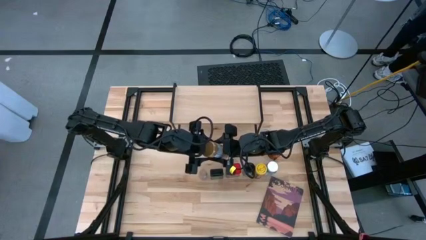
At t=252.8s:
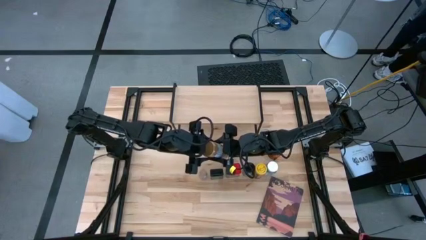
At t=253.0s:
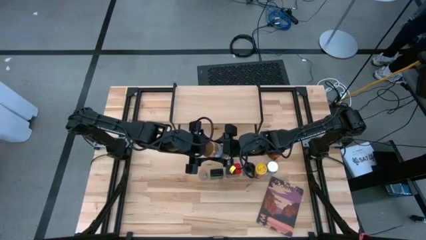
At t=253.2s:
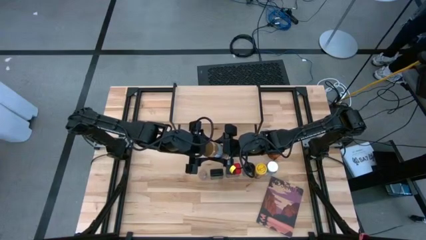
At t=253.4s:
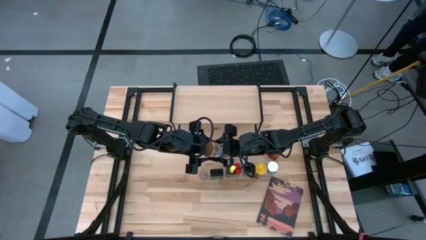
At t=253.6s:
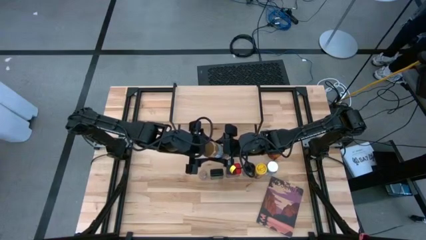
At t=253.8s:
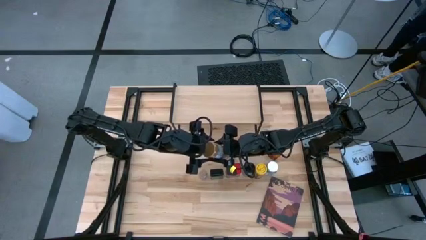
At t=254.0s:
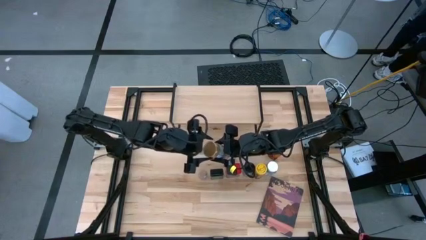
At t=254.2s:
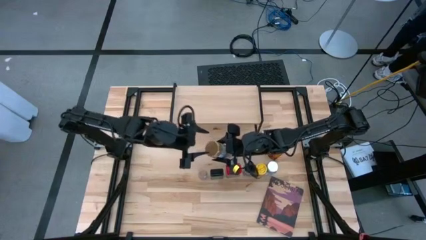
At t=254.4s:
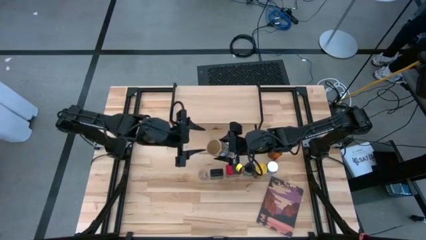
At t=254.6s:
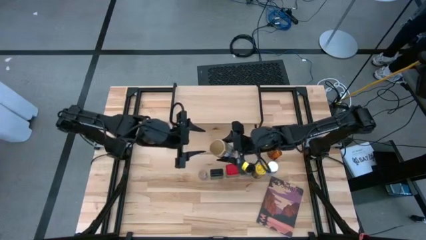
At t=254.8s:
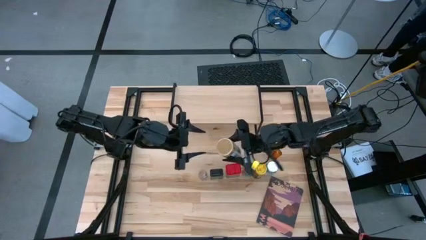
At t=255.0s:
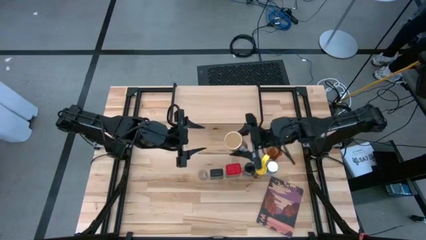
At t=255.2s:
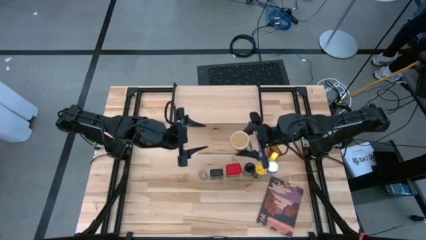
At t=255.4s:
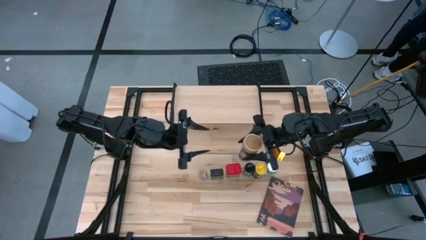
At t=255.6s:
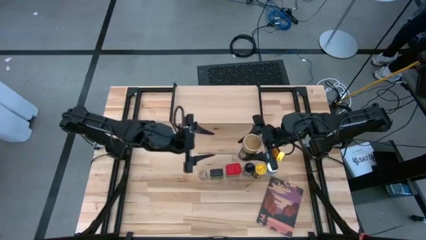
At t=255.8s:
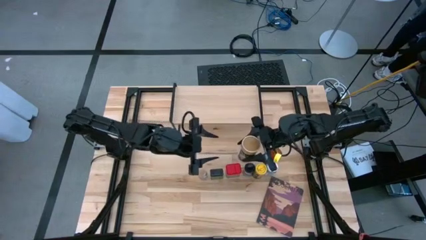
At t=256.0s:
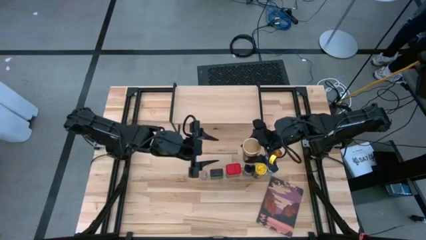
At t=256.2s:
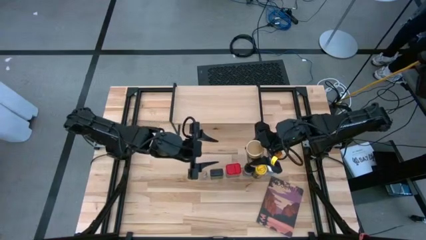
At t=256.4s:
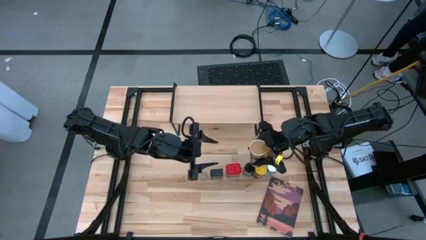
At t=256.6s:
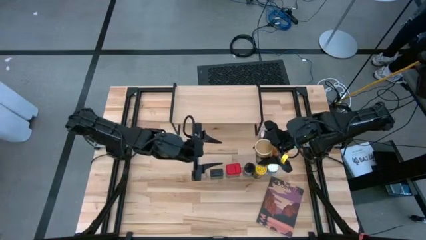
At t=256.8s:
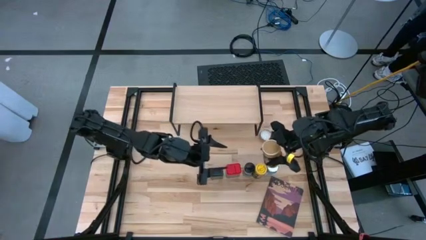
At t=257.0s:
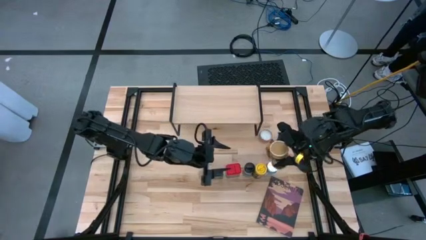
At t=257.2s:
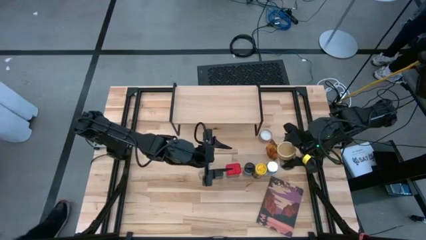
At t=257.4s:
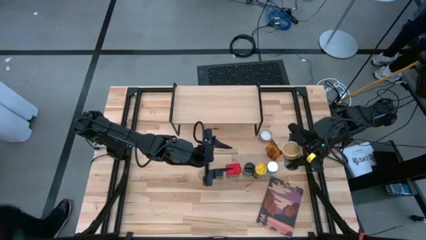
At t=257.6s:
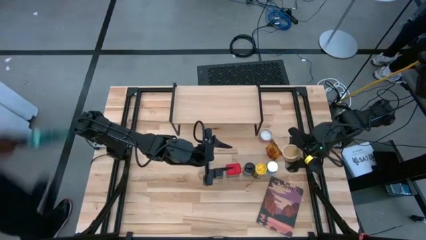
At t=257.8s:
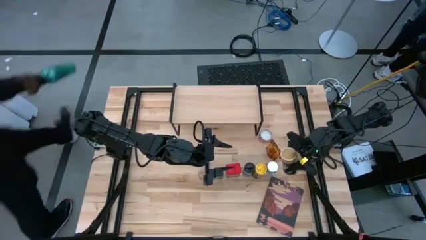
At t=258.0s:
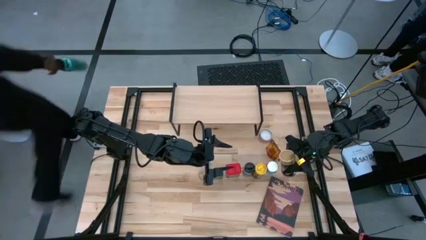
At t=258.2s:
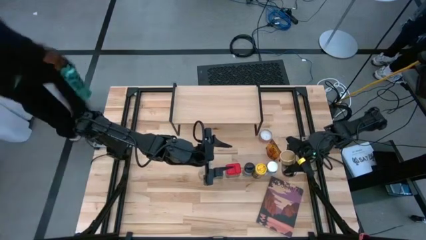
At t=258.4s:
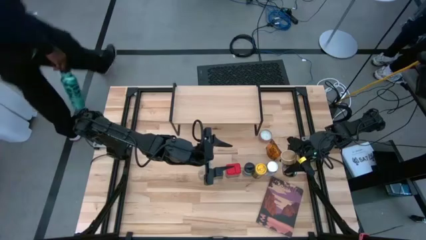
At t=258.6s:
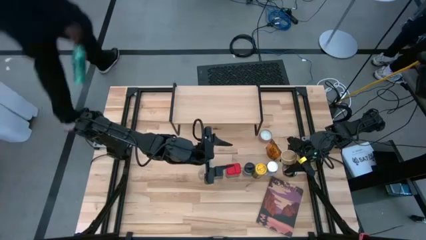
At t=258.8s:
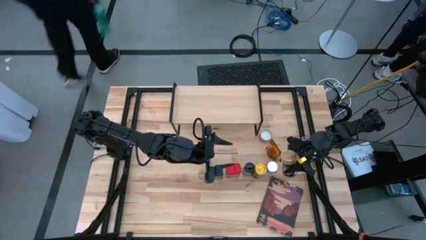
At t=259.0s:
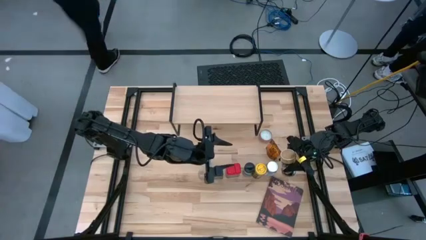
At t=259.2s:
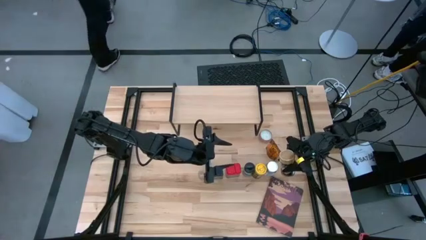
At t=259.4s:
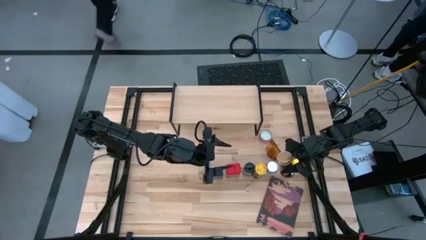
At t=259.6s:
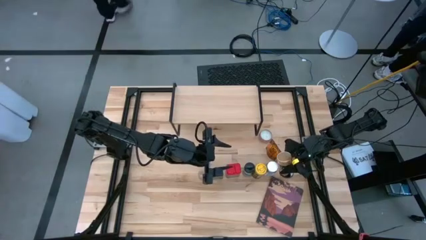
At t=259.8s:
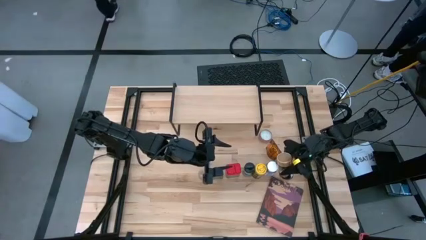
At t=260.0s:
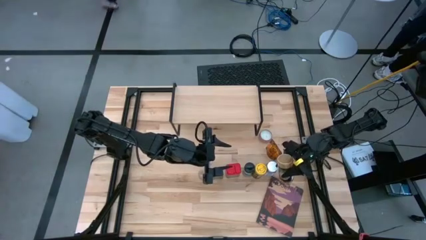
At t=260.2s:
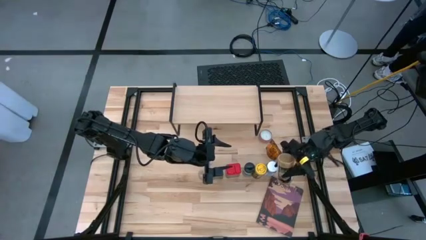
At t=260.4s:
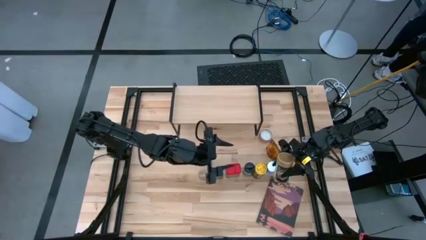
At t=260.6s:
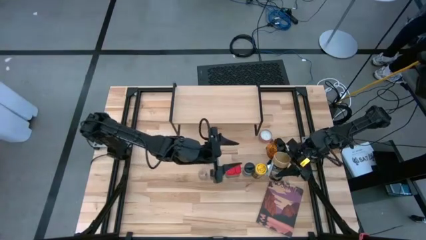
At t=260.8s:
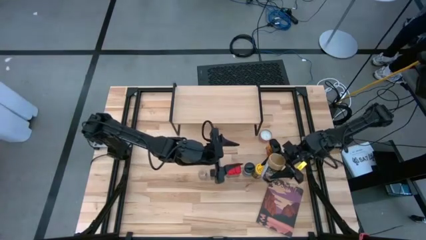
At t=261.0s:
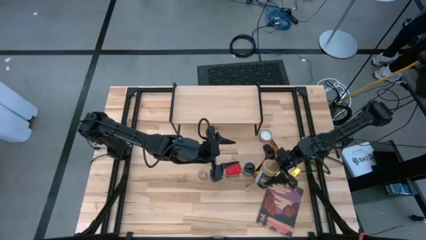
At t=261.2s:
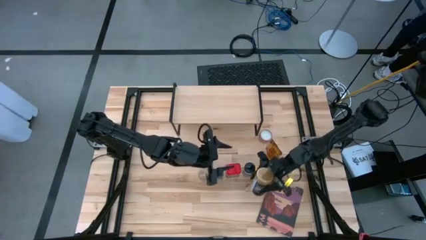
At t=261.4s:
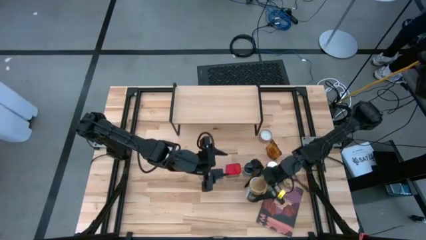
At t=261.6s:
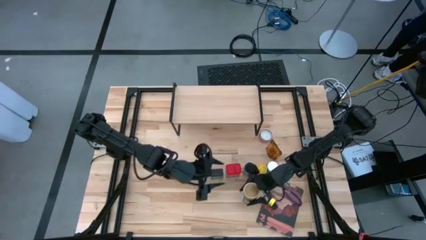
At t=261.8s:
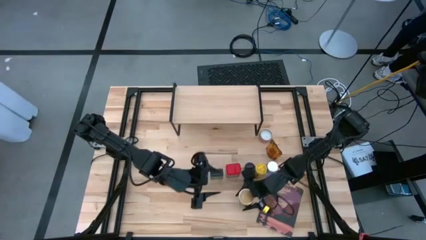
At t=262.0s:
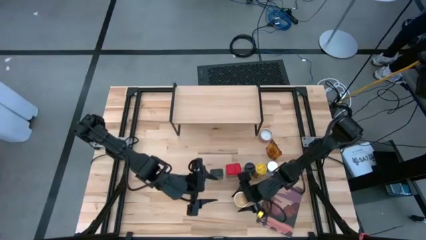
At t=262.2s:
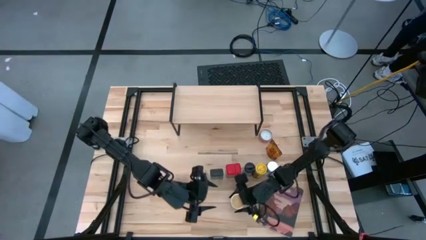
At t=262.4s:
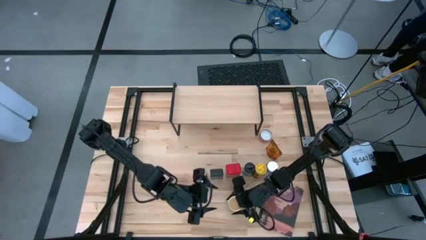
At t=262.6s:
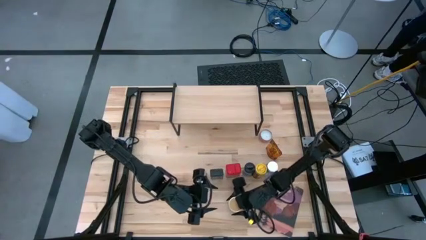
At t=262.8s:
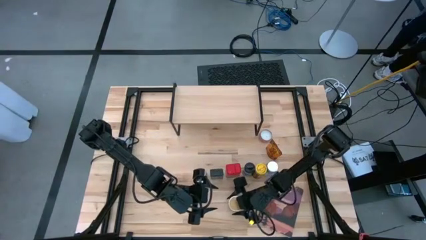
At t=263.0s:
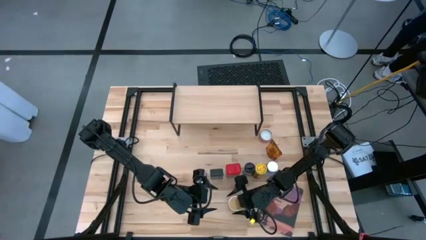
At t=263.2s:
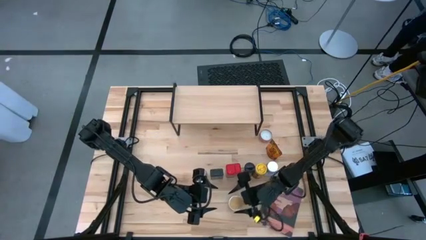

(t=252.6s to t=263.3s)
Task: Shelf spices
Put the brown spice bottle in the bottom center of the table

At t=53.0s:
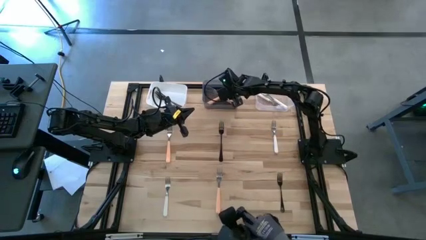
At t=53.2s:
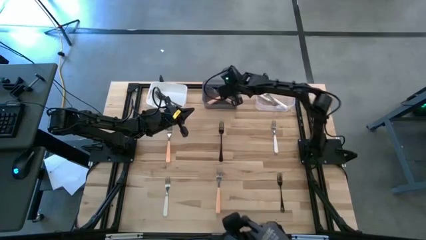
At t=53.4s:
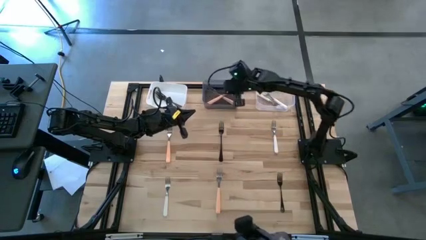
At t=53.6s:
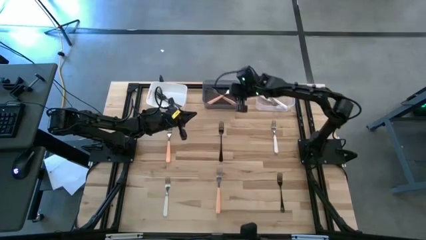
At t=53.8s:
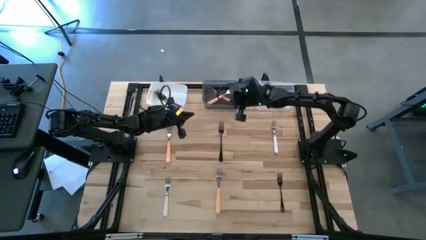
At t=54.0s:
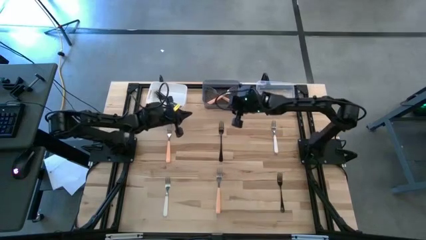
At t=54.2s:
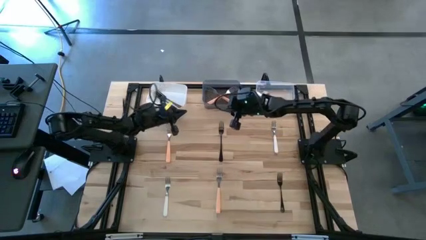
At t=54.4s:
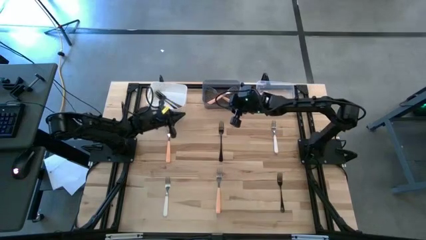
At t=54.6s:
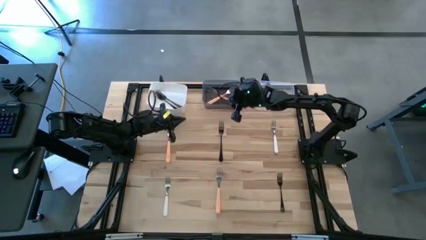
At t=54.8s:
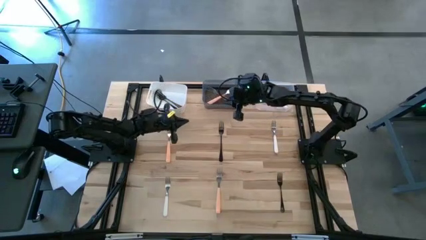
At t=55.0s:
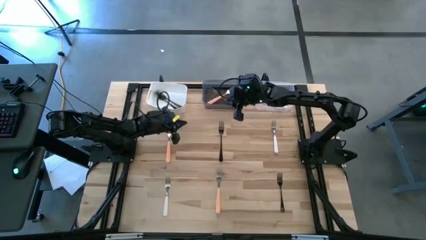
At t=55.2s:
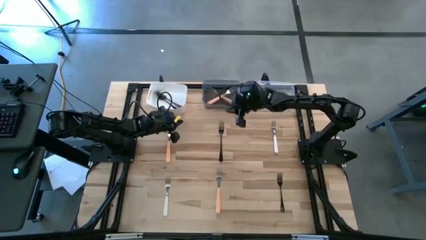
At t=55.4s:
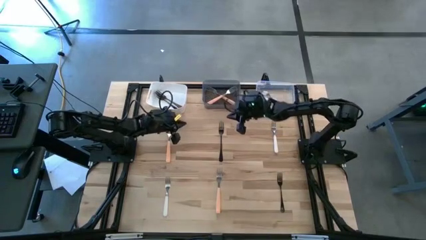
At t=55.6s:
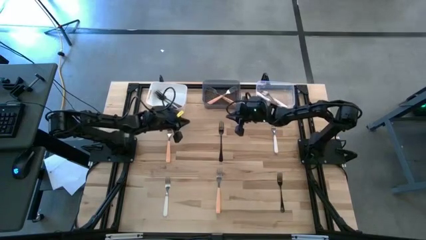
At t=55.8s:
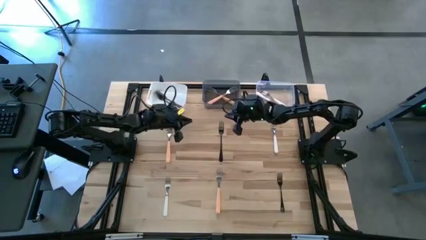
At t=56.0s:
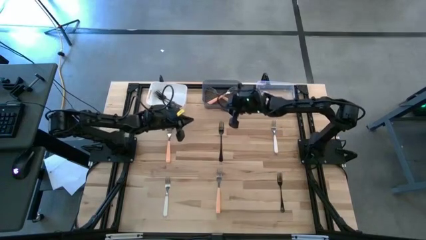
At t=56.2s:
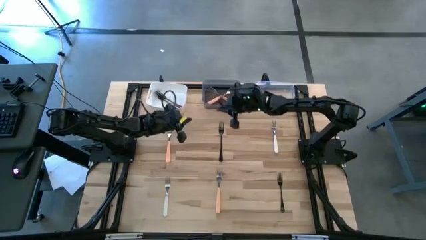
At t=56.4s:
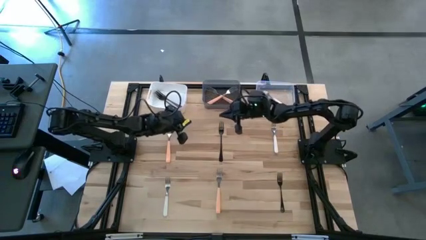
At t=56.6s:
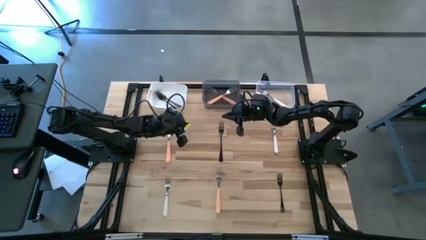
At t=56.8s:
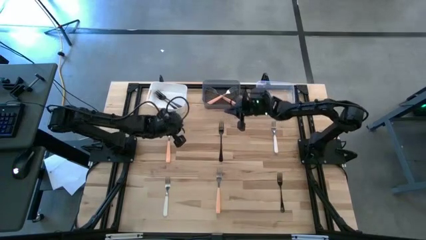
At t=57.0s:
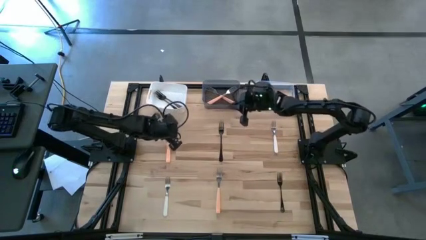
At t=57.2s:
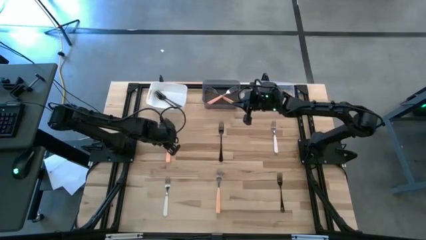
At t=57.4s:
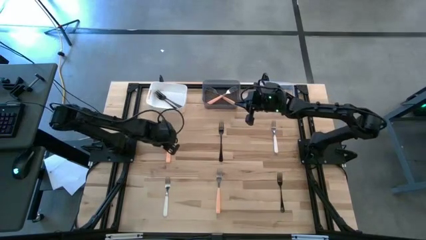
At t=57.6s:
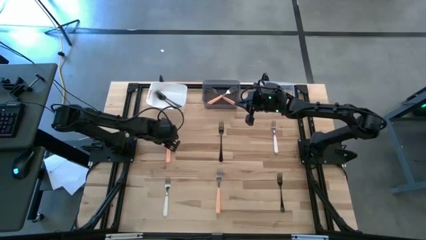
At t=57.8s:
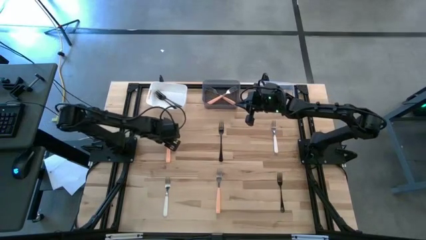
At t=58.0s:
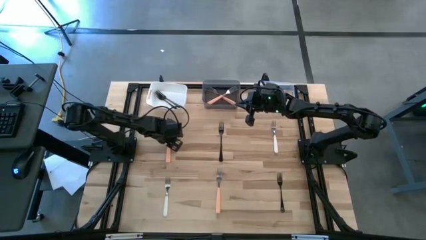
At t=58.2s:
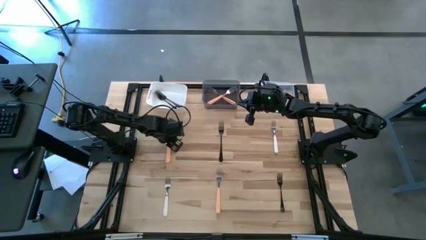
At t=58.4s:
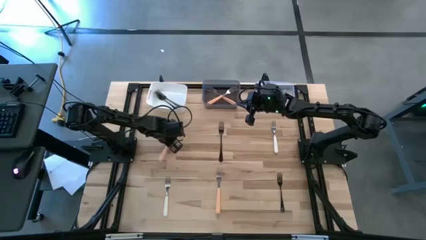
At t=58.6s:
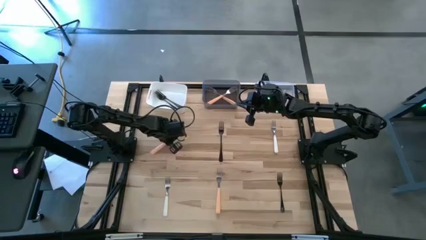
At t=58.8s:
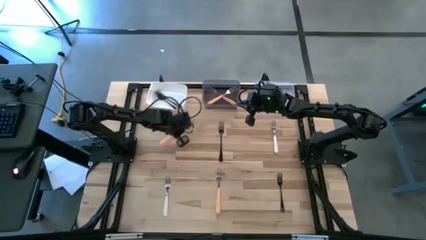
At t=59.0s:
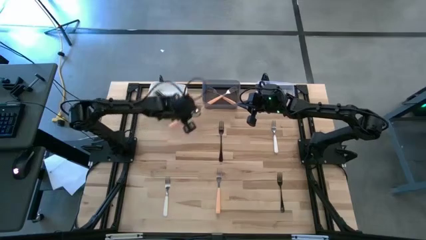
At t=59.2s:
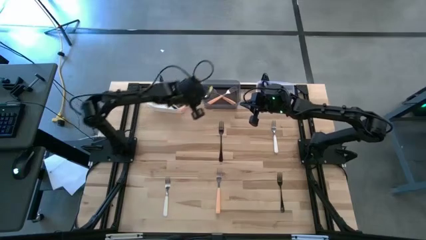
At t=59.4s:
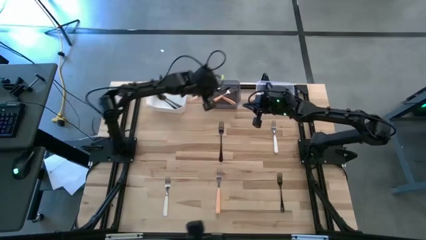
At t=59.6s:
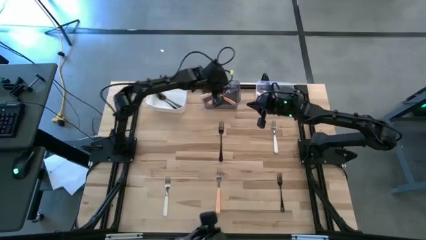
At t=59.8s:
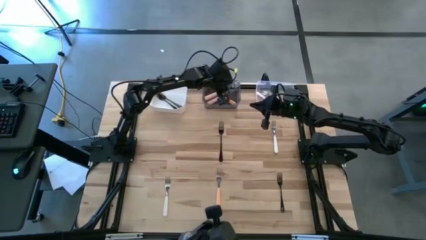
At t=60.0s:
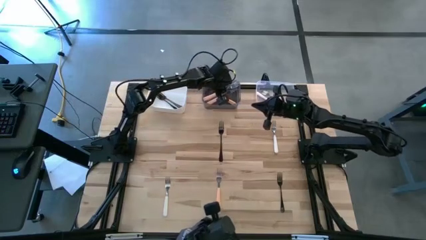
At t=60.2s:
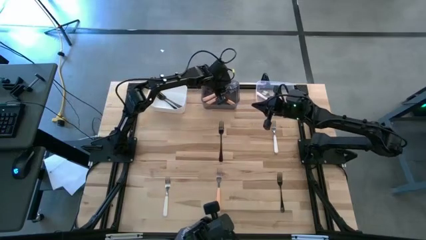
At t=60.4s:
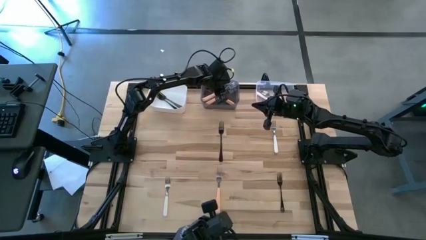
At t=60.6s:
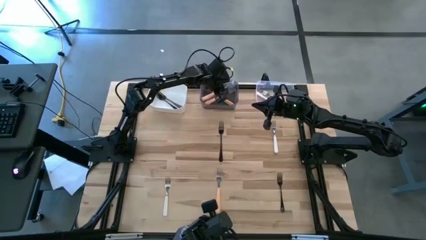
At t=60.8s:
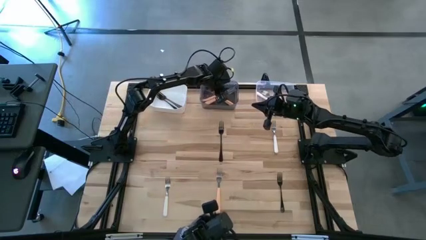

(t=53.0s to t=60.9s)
Task: Sort silverware by color (type)
Put the top orange fork into the black bin
